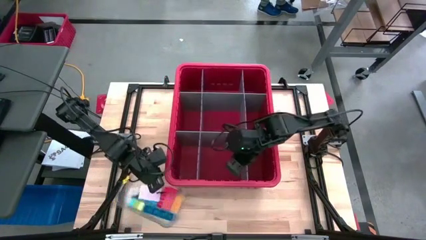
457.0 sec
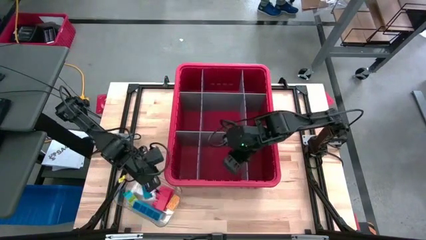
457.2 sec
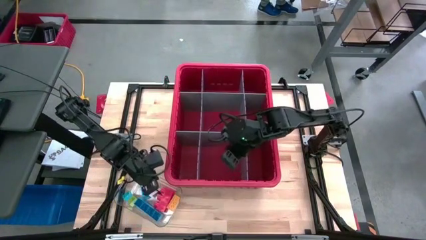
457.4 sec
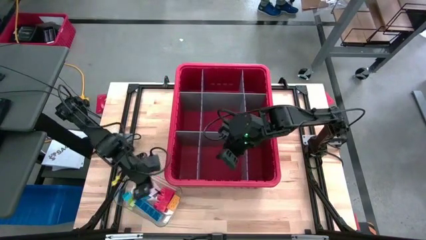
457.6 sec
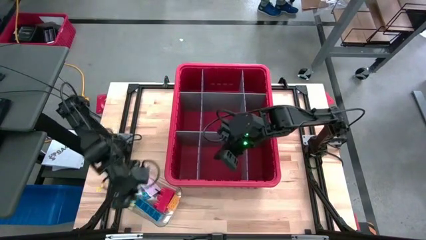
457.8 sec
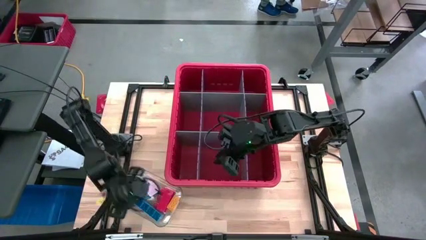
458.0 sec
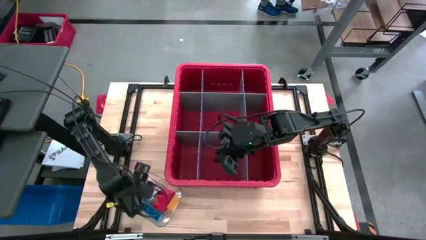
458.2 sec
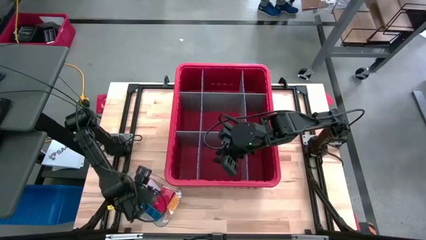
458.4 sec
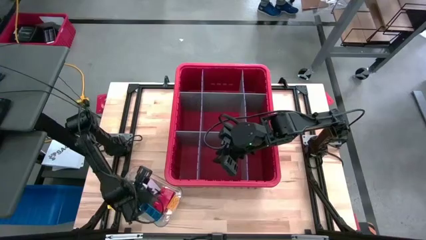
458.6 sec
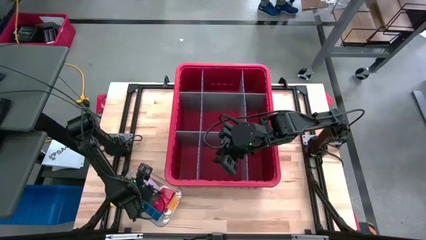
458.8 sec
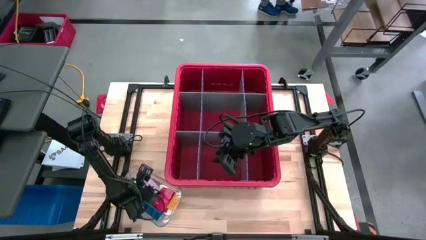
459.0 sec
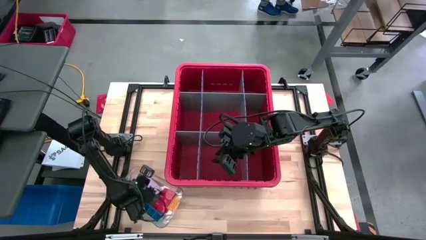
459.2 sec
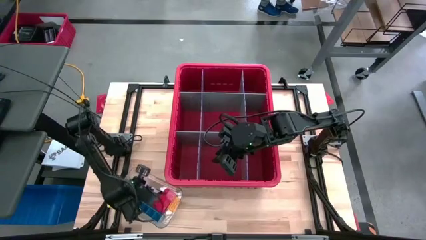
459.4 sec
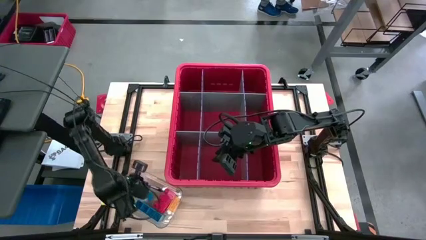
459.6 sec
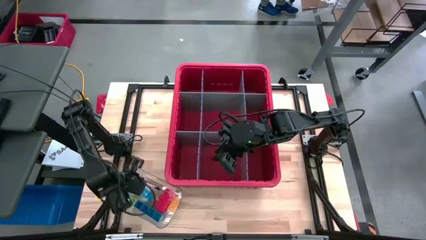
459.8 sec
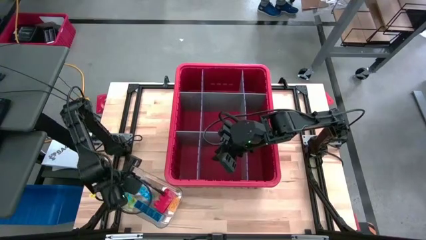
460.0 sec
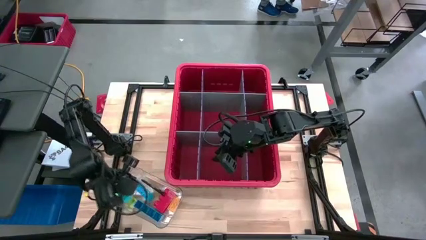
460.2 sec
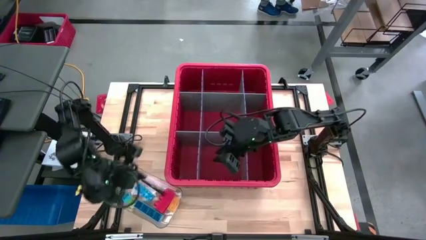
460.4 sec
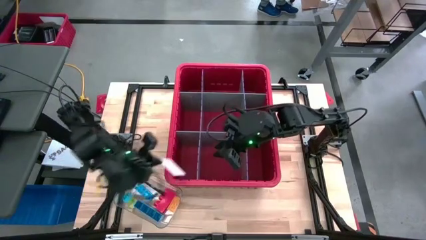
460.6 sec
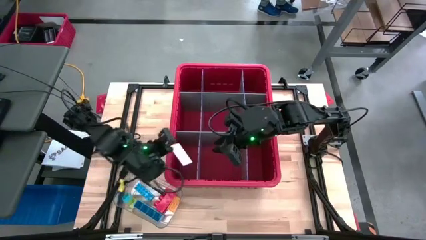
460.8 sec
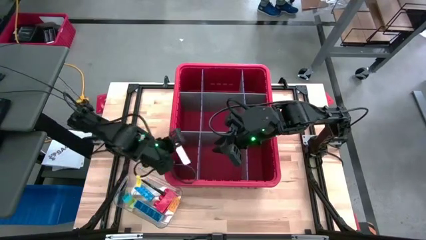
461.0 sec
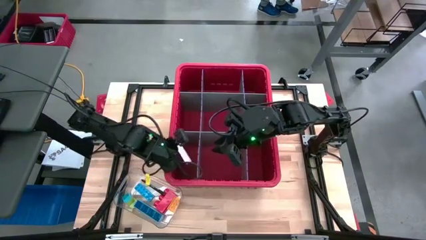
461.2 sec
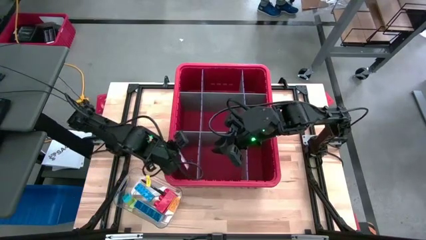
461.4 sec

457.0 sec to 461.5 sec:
Task: Sort blocks
Put the game card into the bin

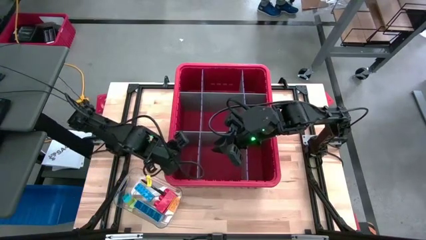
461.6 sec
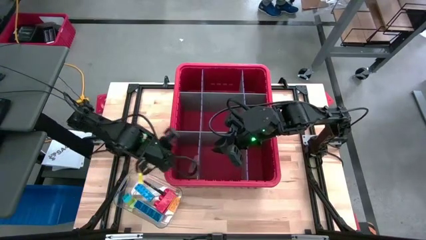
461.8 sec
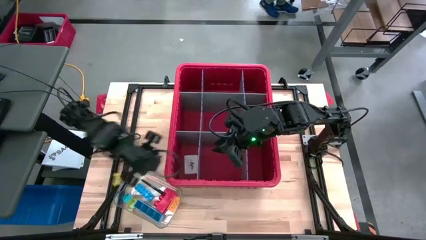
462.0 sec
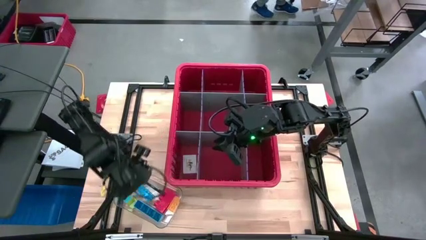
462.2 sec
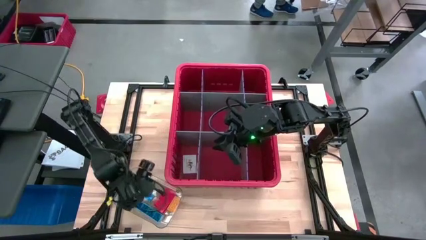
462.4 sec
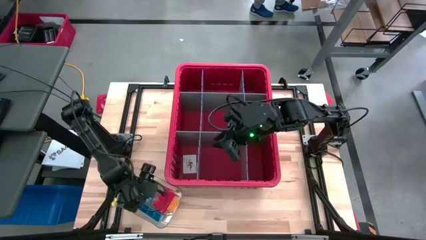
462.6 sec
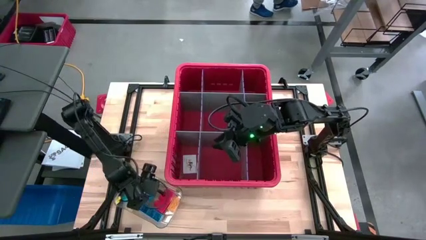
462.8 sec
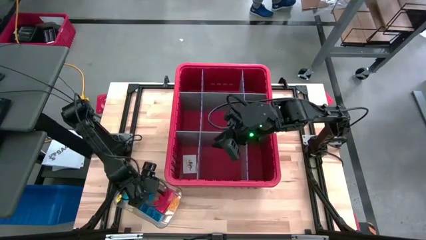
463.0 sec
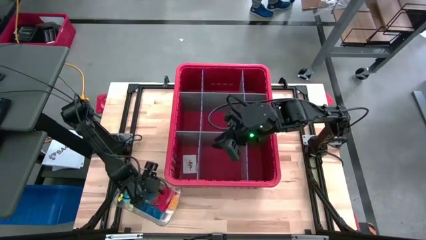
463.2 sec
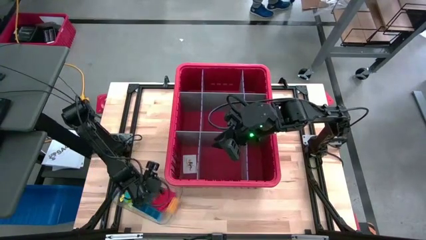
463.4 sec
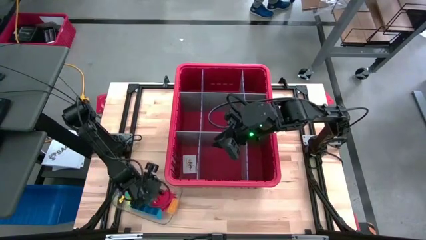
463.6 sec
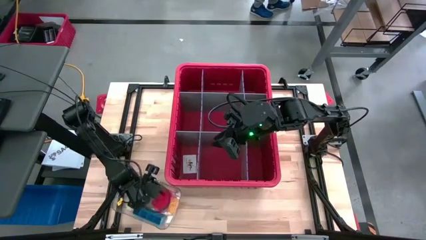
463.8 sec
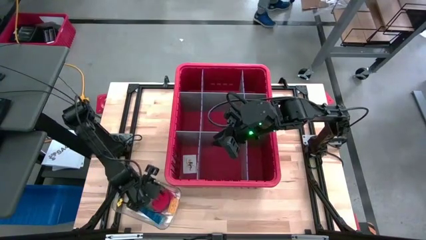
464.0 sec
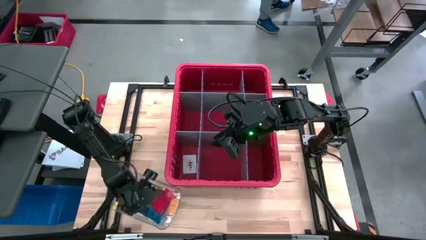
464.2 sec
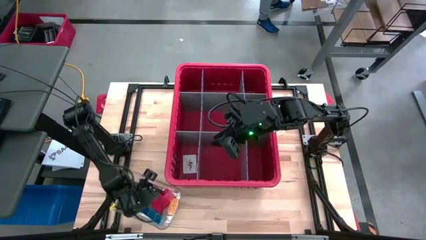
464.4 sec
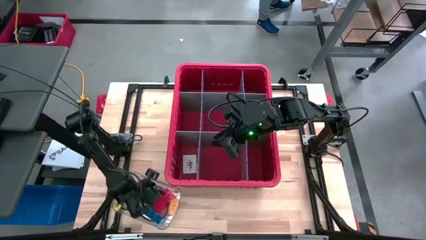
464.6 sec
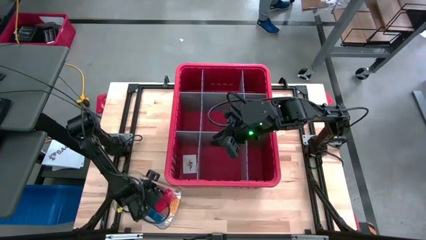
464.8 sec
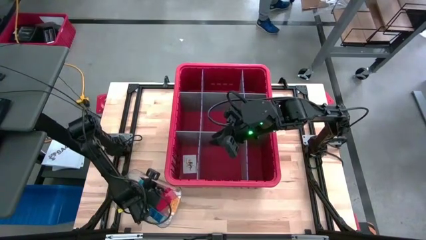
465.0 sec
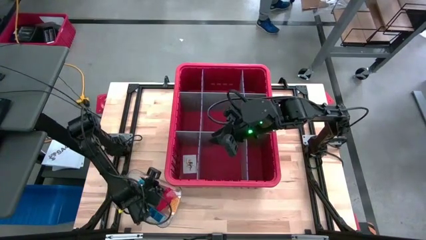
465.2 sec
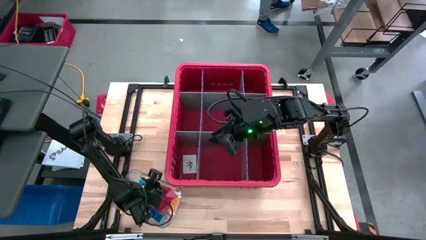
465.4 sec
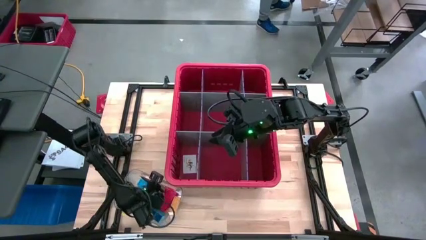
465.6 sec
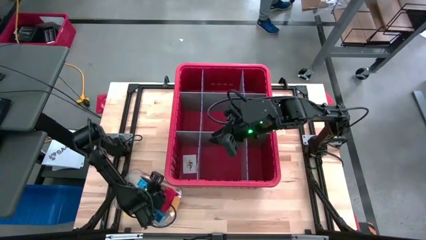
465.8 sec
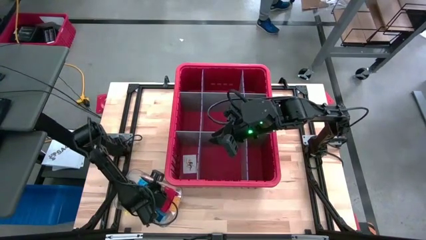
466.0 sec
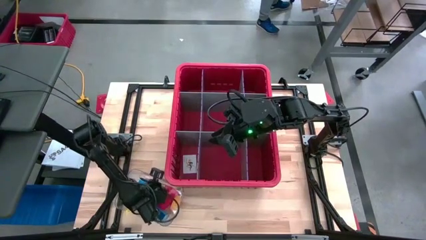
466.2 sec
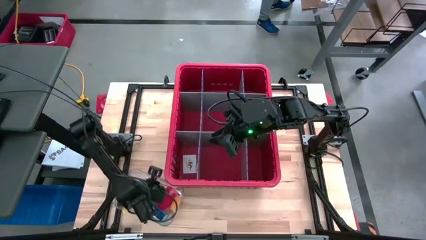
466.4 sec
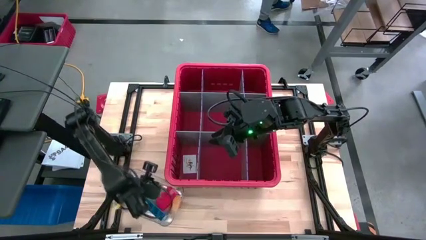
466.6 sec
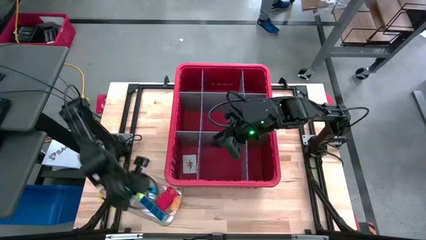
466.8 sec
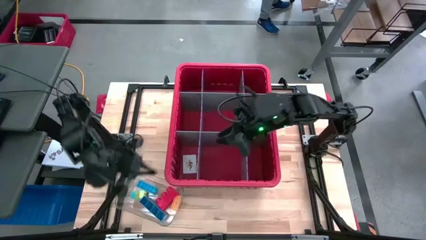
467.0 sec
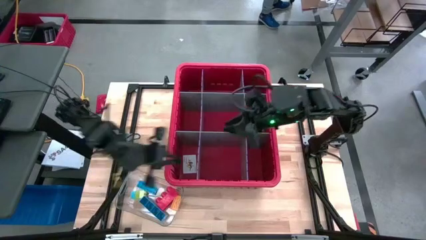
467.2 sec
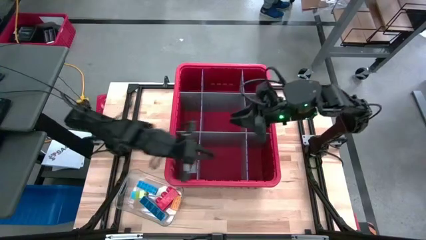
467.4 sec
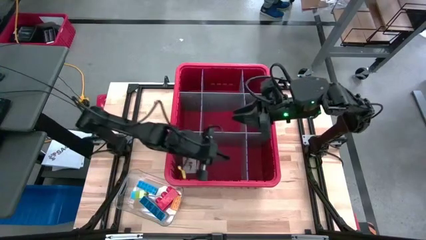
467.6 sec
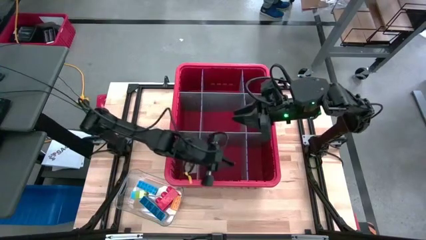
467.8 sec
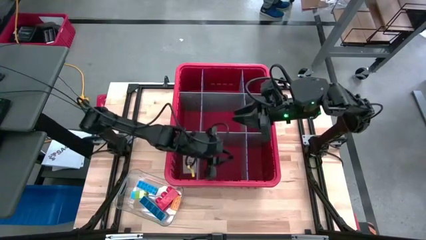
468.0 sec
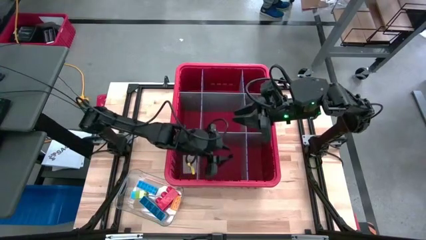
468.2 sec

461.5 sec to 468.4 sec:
Put the black pen into the bin

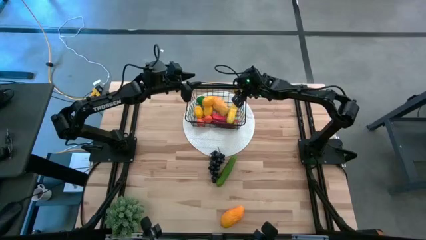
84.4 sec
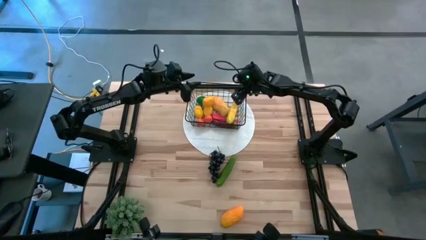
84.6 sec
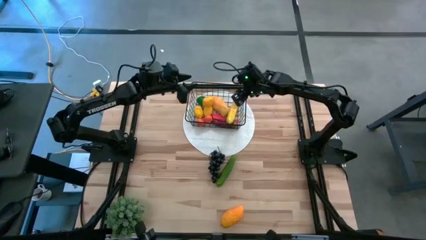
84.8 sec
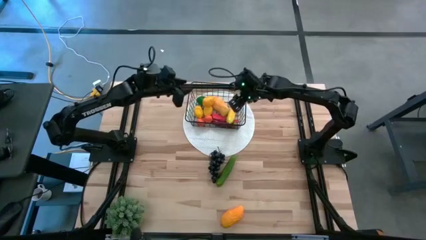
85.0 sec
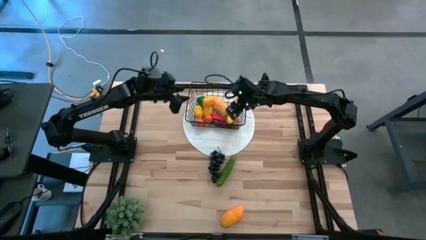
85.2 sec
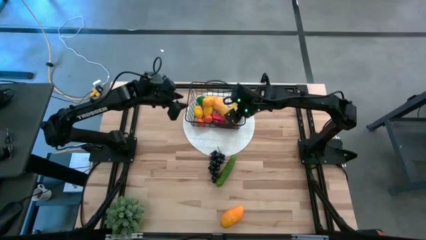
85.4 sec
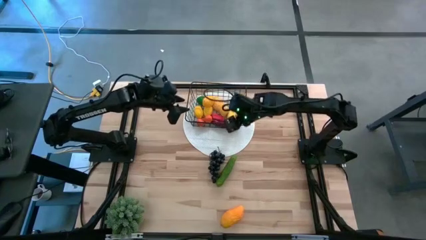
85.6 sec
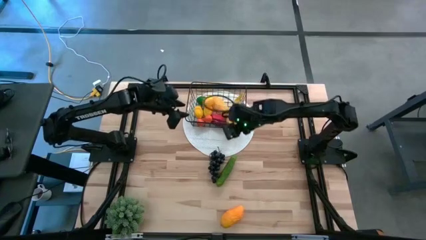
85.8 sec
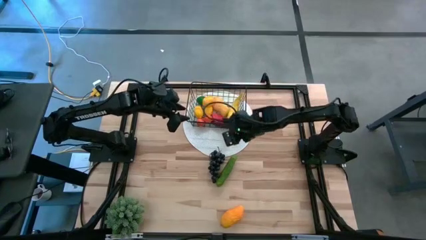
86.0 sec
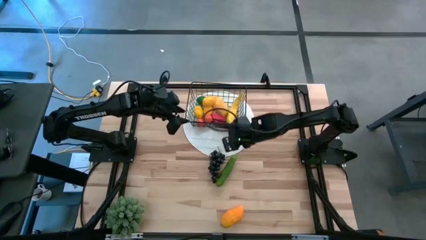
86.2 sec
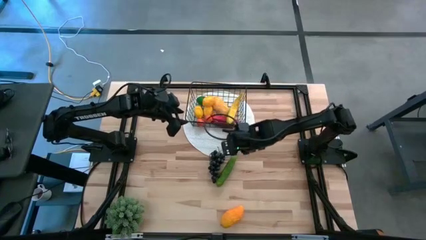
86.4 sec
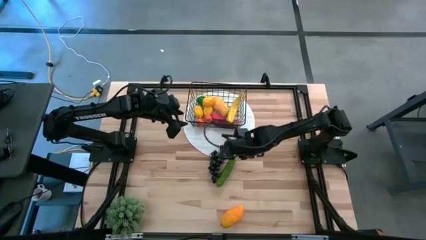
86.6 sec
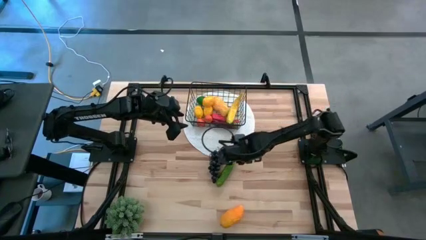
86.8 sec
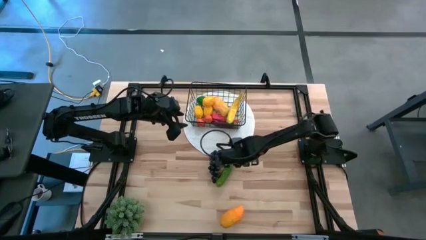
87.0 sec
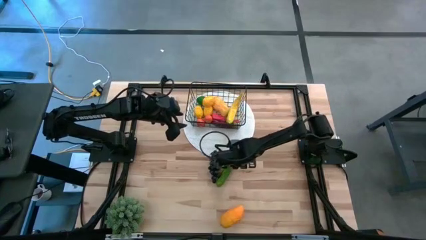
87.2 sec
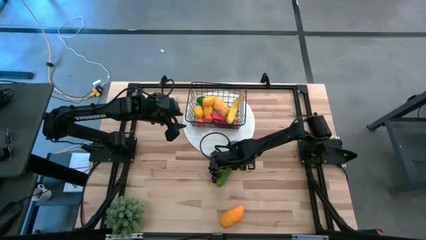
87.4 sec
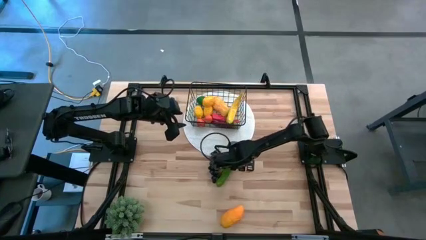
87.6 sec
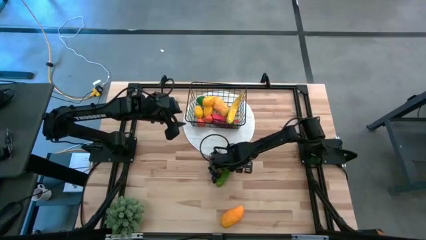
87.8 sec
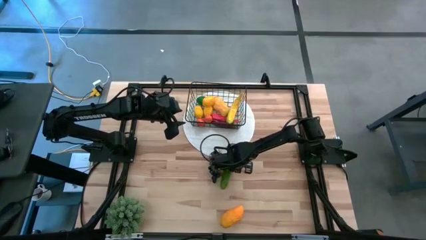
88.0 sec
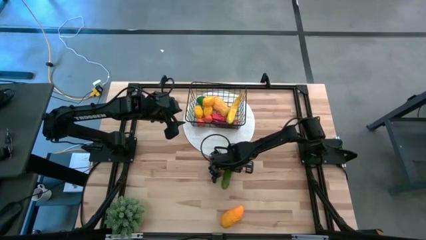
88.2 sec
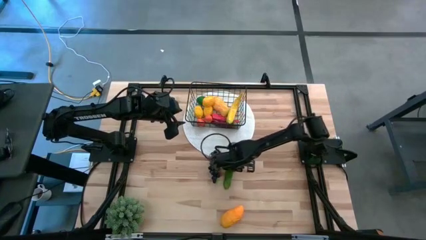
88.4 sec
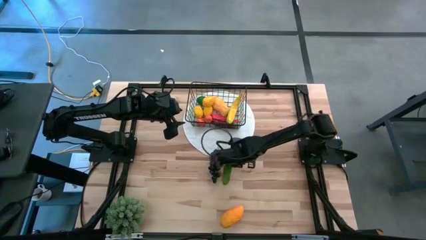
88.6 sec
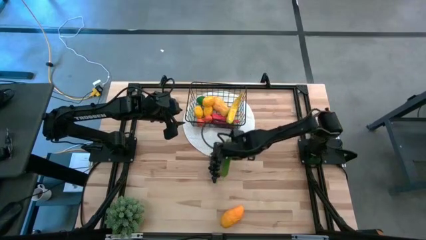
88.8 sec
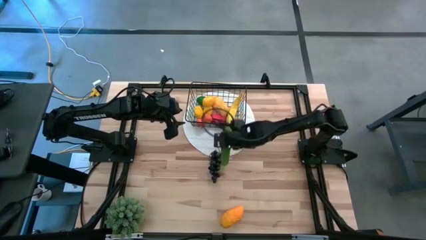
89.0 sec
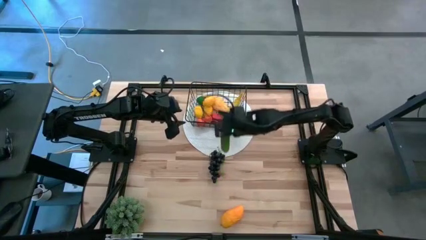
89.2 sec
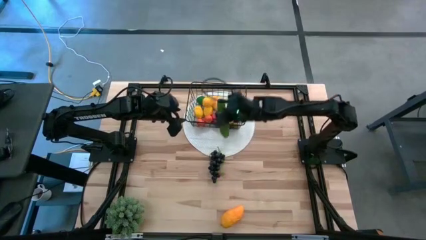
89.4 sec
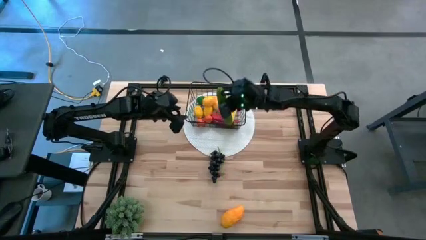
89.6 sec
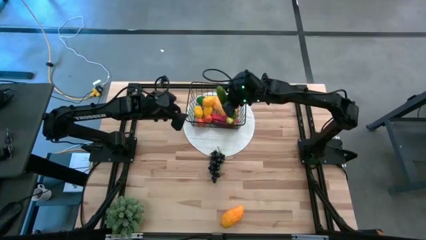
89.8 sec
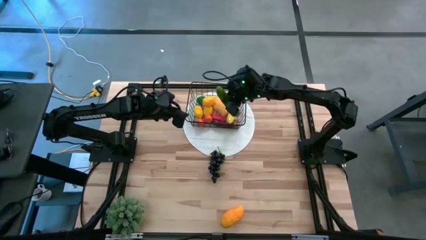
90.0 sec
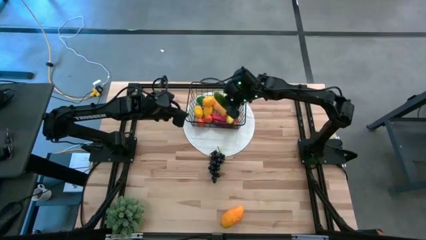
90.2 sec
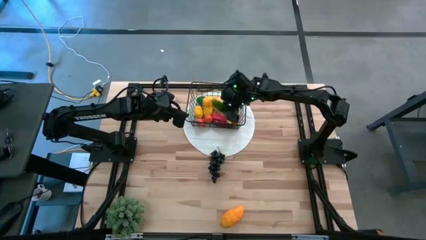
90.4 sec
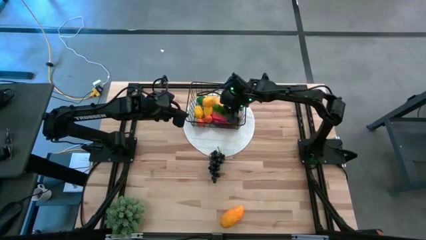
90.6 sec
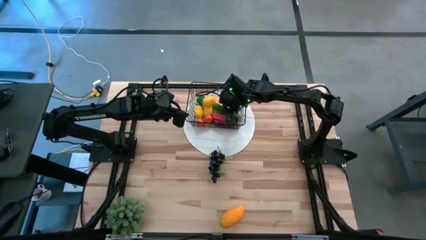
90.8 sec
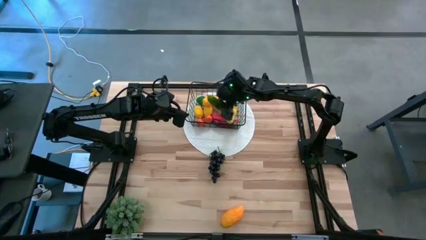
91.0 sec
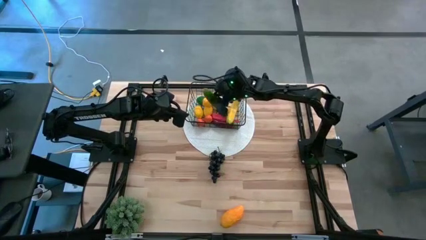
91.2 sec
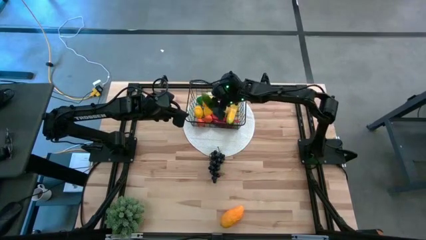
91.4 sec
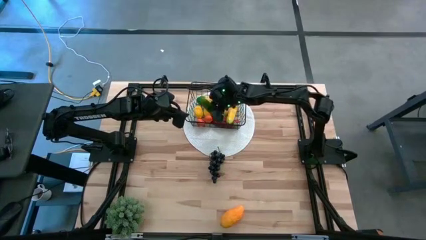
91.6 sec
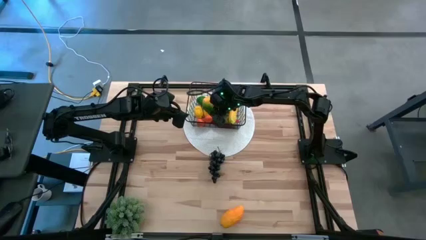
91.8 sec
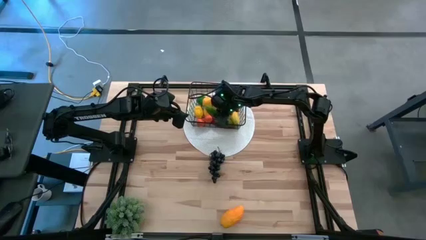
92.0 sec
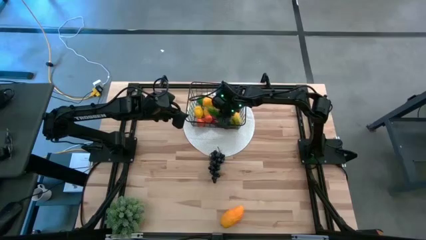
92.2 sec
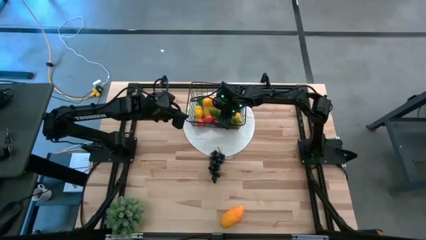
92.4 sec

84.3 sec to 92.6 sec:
Task: Build produce basket
Put the green cucumber into the black wire basket
